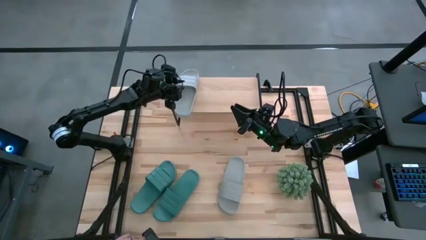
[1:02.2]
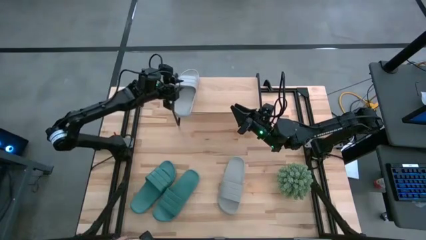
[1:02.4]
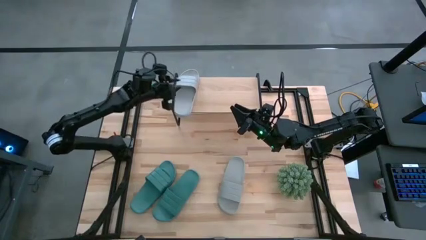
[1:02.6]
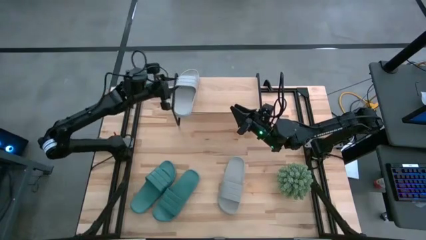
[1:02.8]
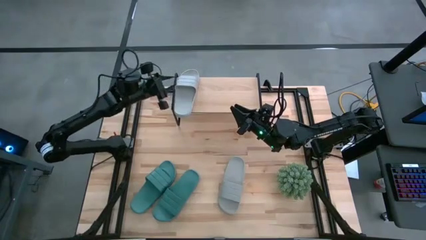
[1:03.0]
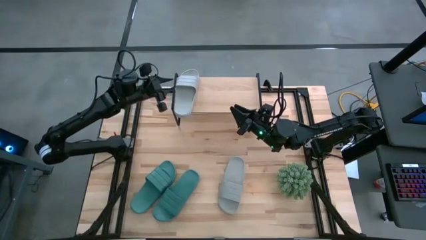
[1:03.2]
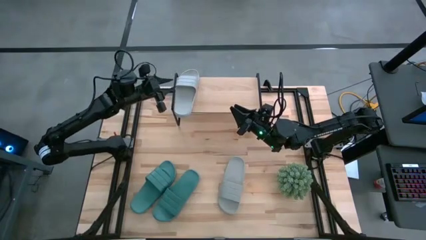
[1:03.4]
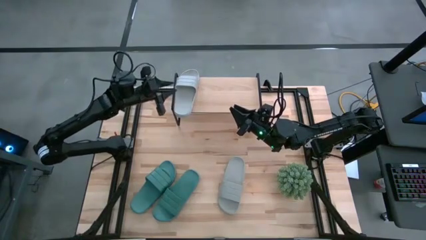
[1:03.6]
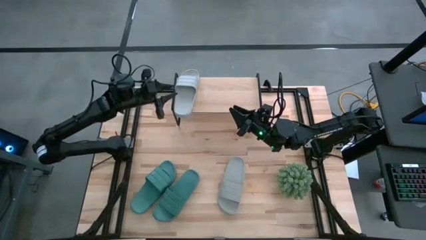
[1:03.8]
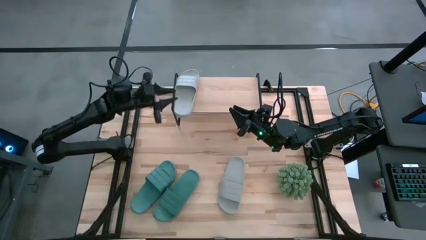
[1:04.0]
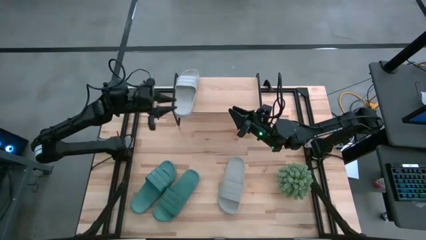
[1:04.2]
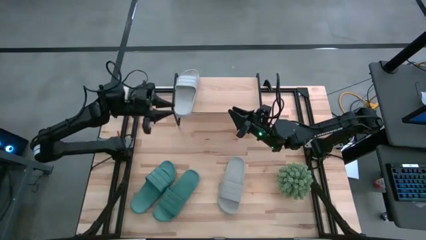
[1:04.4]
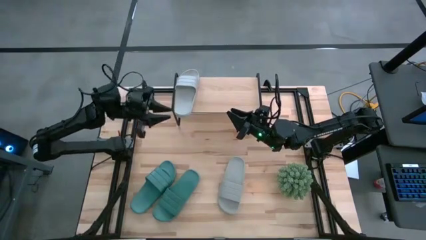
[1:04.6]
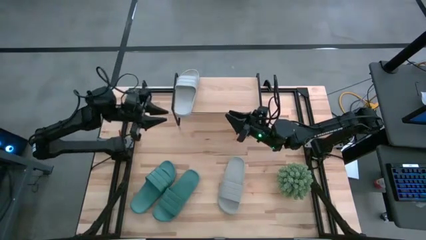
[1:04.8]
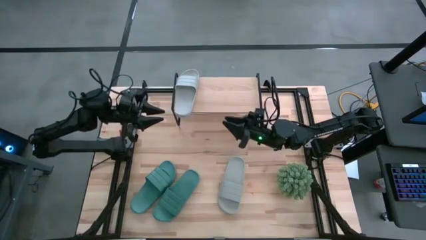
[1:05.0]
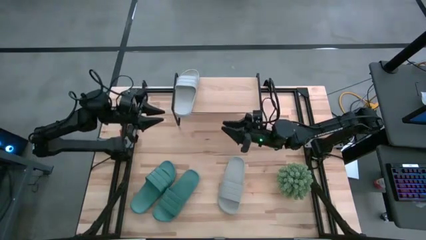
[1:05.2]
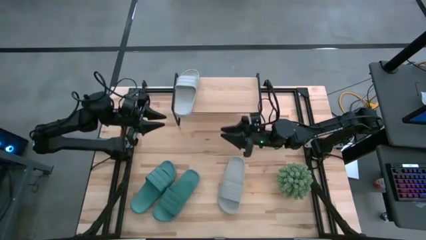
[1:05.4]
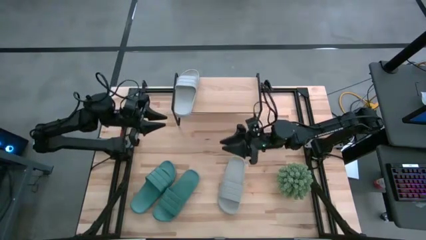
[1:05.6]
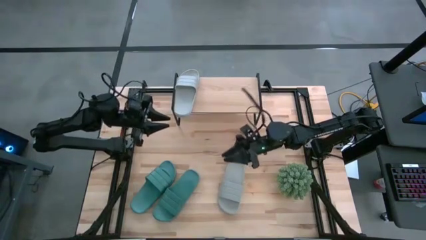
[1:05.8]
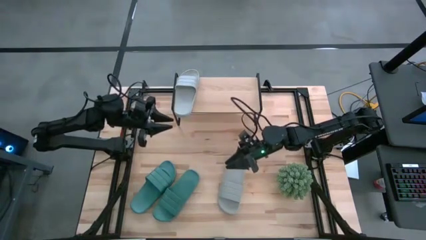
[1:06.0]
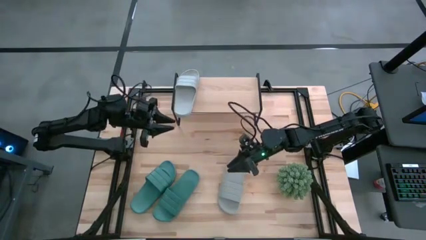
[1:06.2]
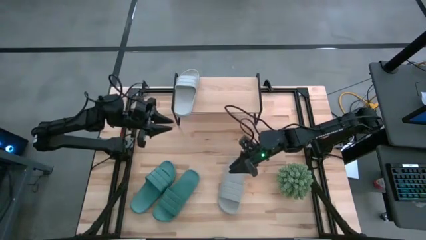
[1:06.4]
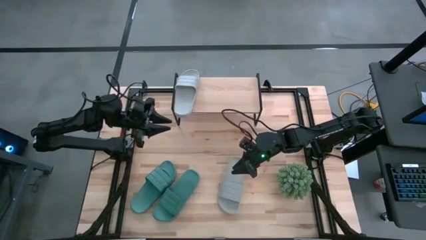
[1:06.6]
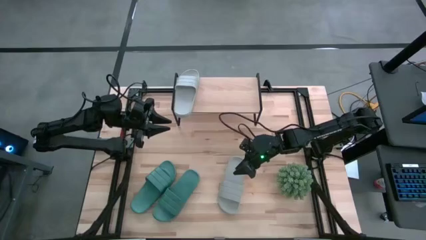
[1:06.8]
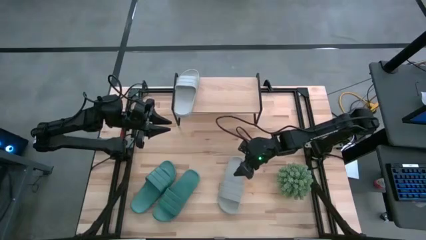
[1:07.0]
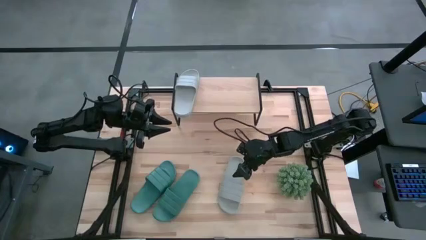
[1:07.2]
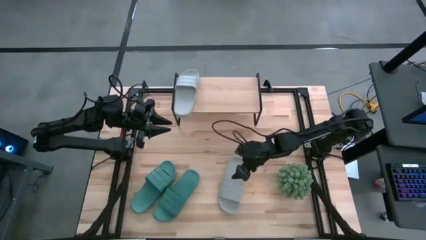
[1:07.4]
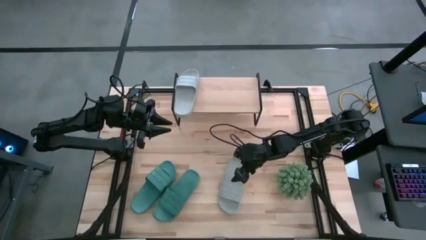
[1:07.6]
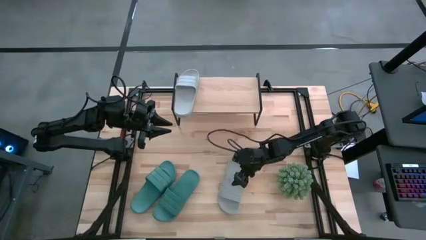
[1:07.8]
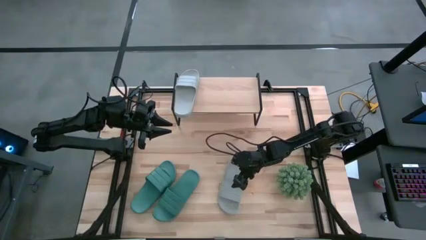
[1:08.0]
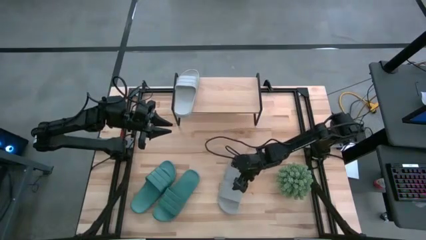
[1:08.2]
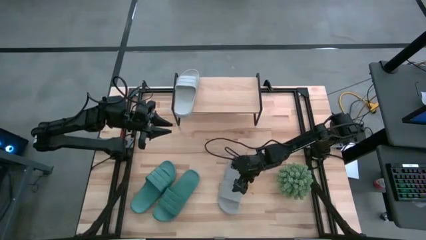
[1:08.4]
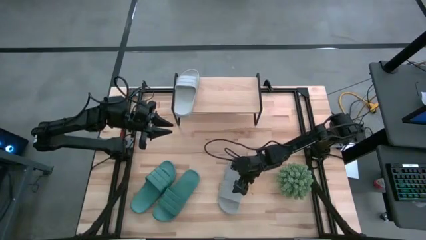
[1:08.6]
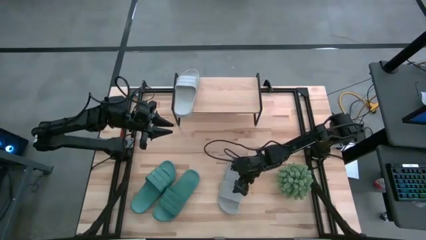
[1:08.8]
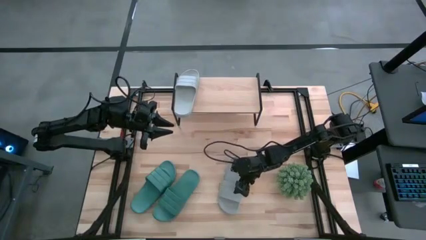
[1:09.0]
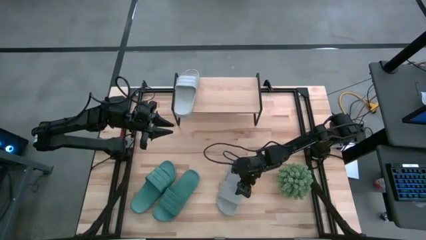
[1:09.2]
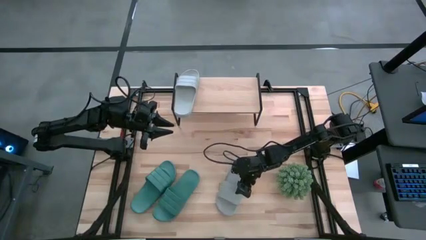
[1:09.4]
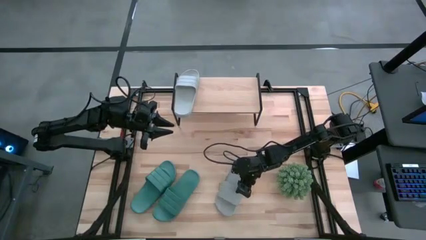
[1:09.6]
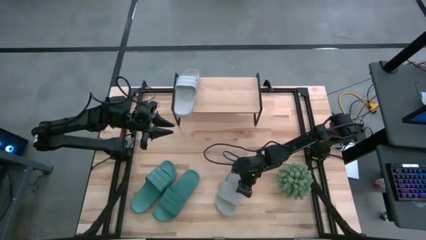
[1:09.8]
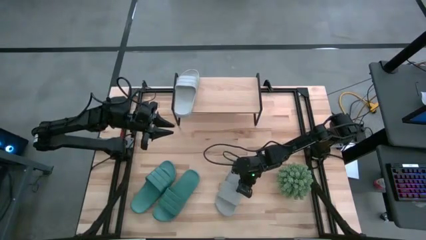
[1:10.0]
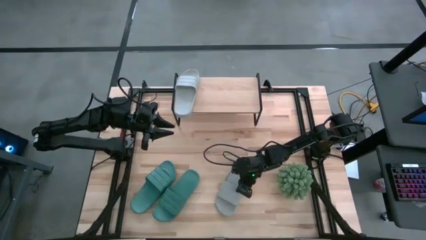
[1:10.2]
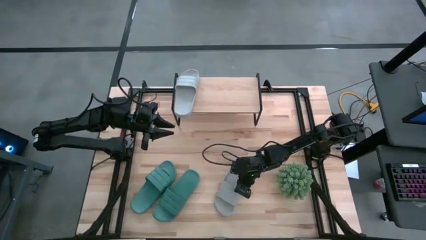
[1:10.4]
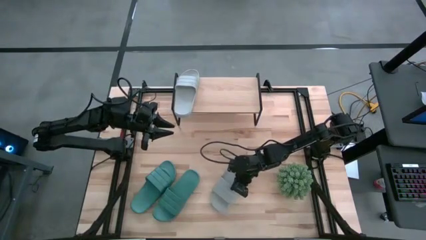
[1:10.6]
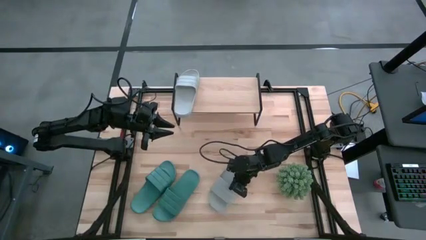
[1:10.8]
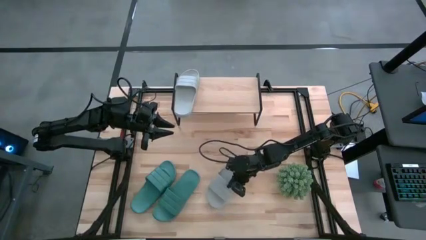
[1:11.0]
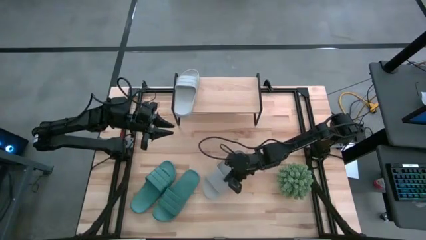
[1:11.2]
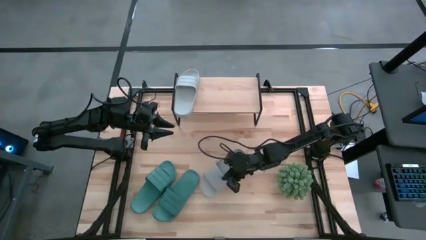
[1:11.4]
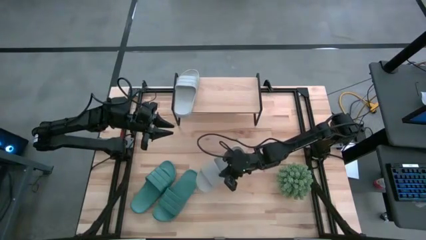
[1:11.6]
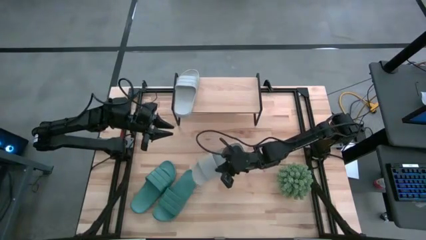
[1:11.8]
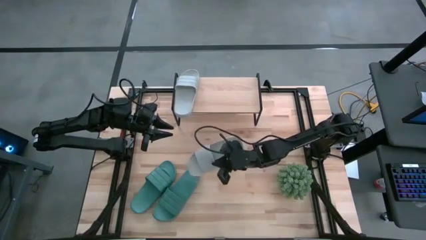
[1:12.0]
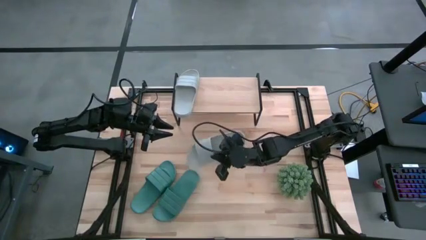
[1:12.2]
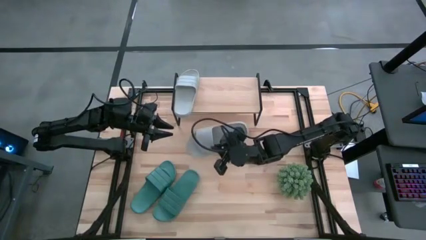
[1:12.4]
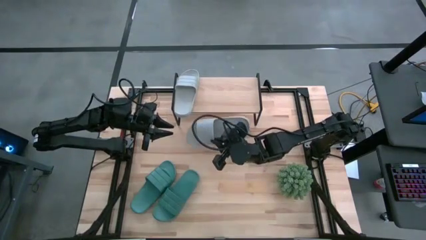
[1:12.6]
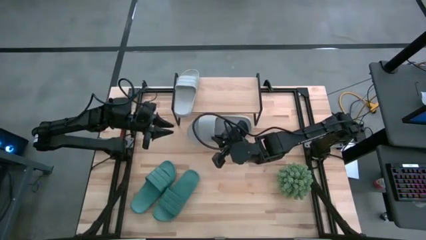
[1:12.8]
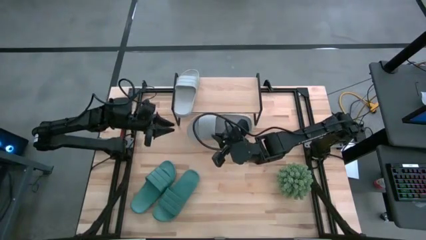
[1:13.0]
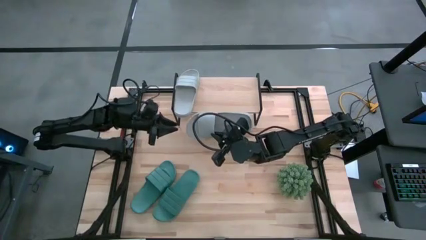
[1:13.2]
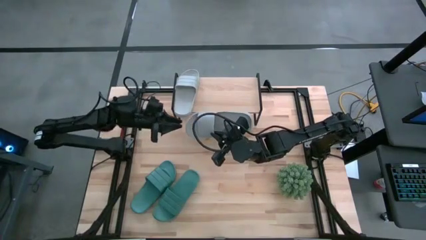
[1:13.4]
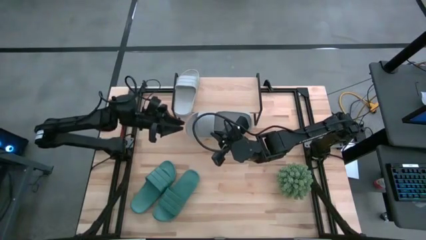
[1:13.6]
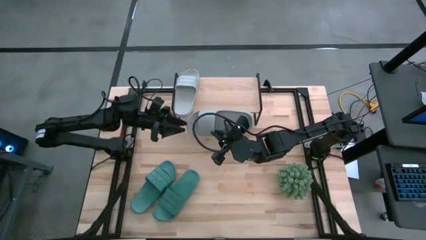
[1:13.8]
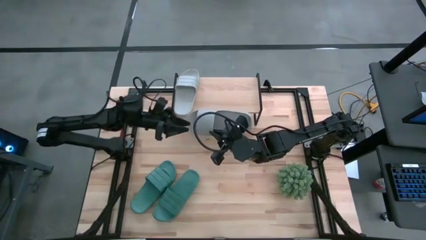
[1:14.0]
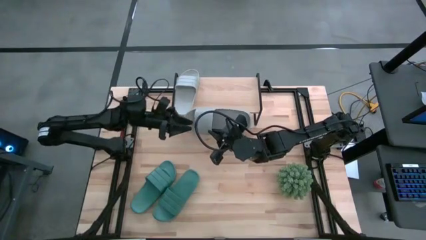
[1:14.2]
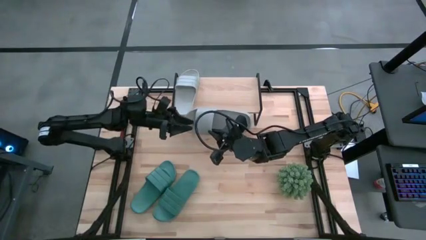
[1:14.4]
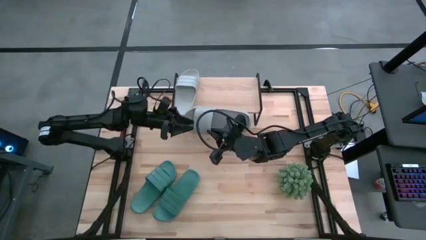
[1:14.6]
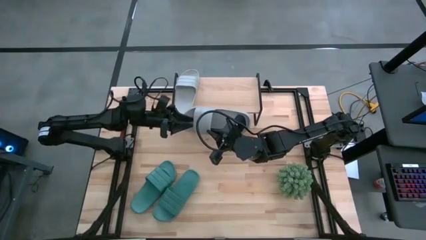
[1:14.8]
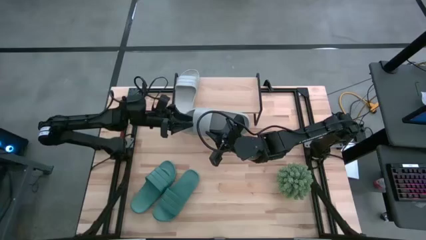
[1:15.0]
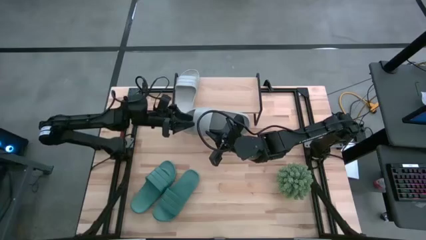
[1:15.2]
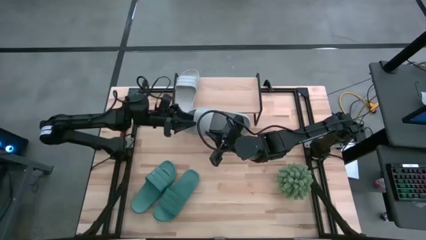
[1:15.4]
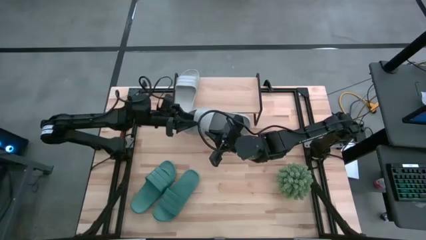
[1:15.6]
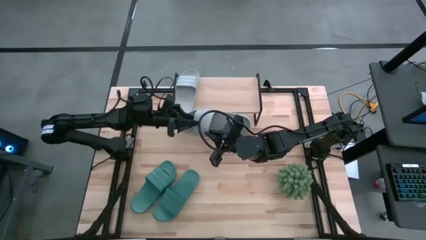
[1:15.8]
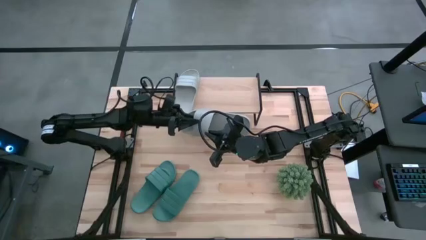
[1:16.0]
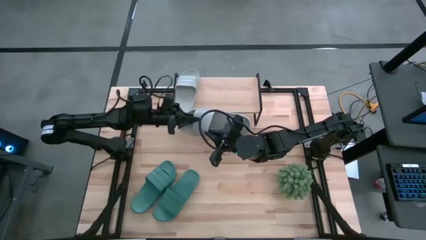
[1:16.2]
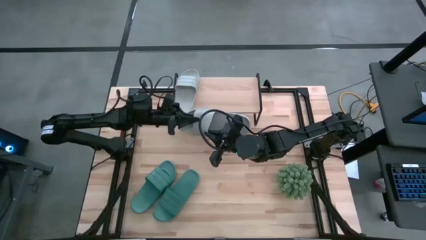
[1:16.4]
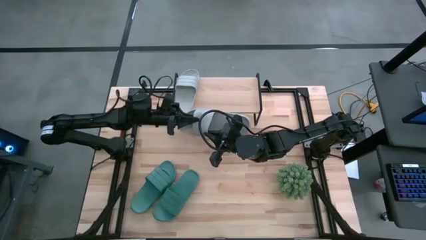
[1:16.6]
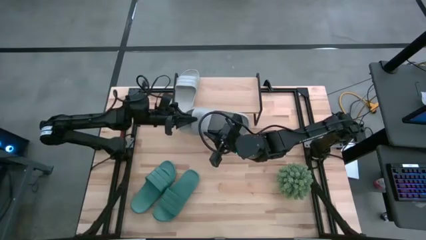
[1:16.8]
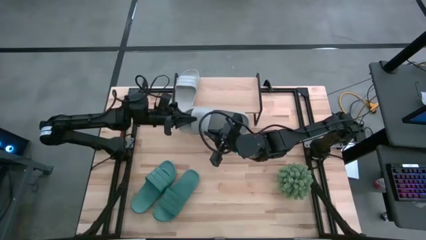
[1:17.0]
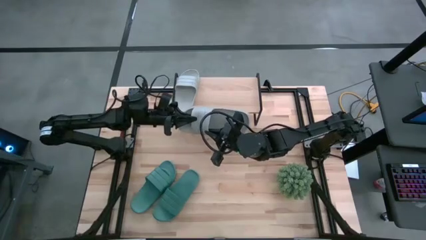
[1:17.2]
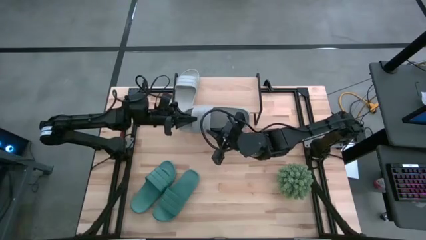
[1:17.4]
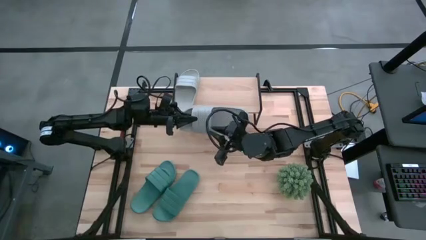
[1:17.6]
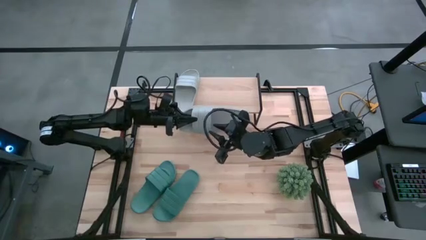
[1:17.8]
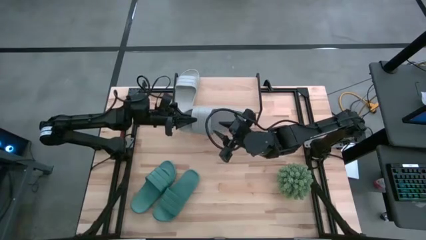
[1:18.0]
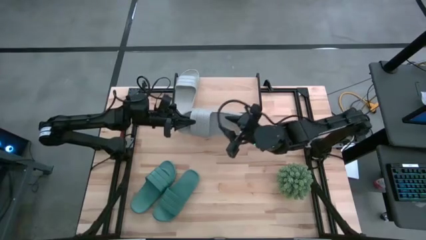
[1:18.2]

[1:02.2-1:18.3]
Task: Pick and place slides into the shelf
Put the gray slide on the shelf
